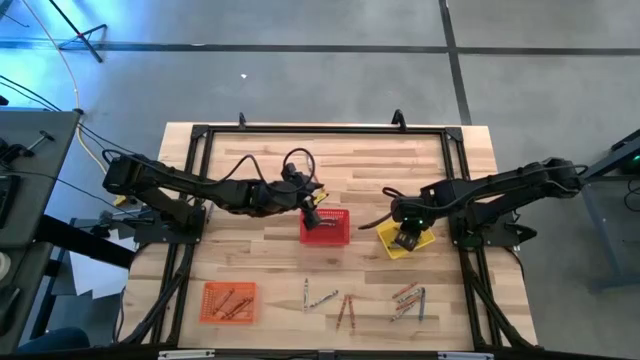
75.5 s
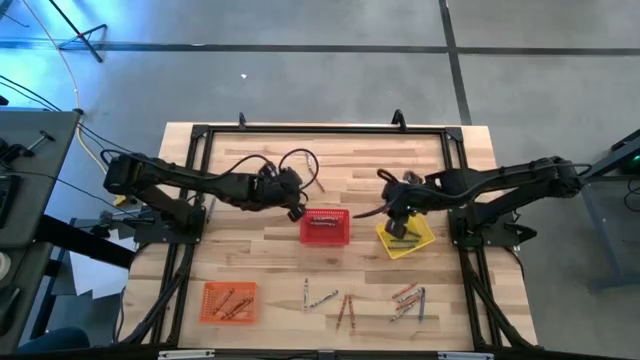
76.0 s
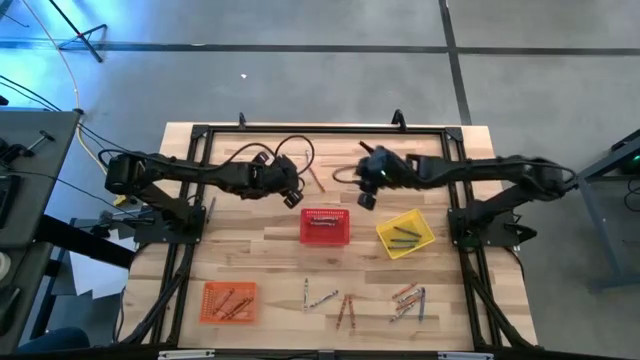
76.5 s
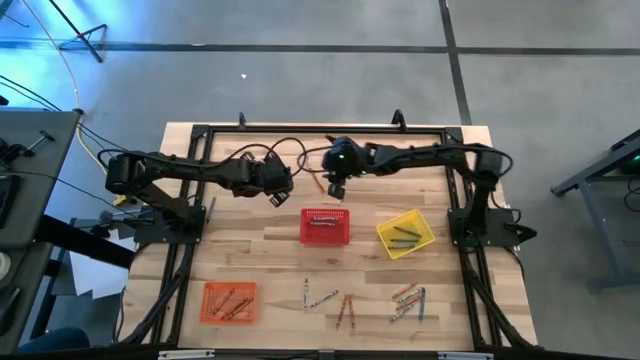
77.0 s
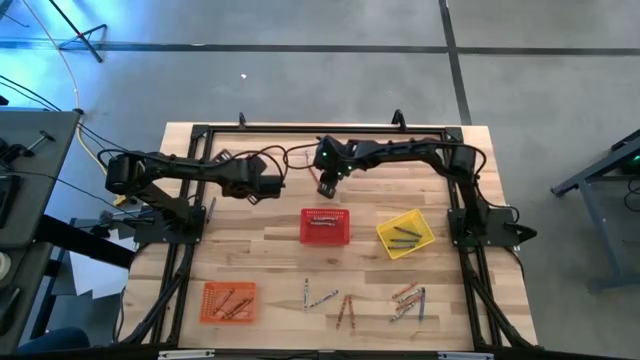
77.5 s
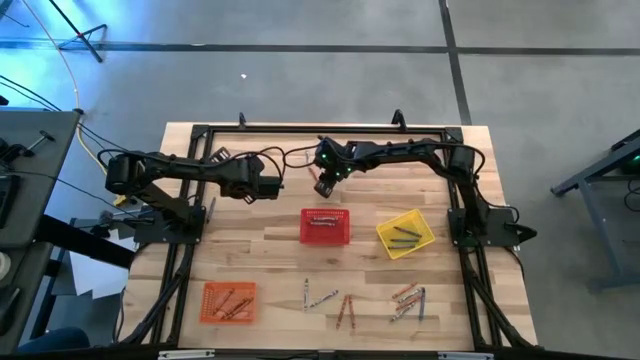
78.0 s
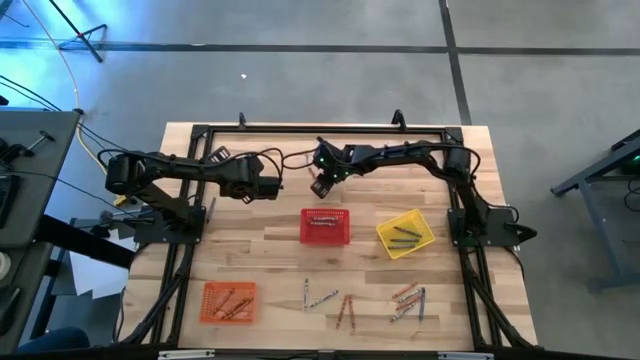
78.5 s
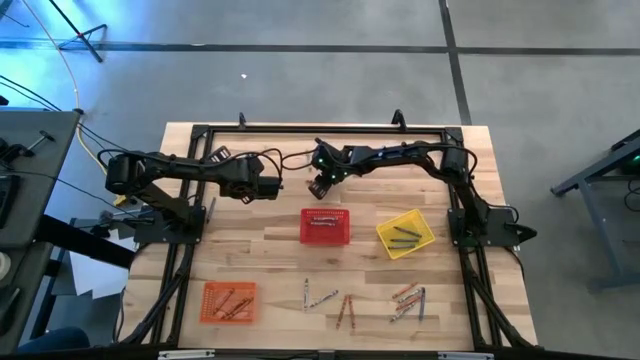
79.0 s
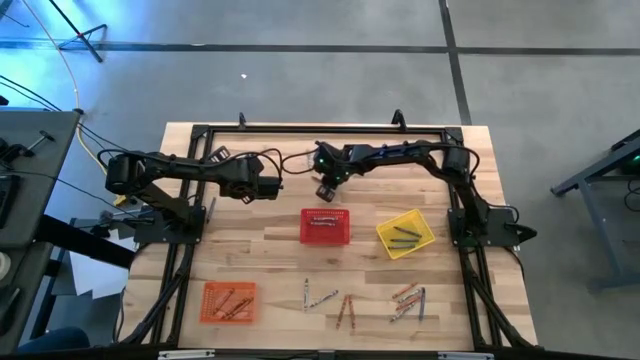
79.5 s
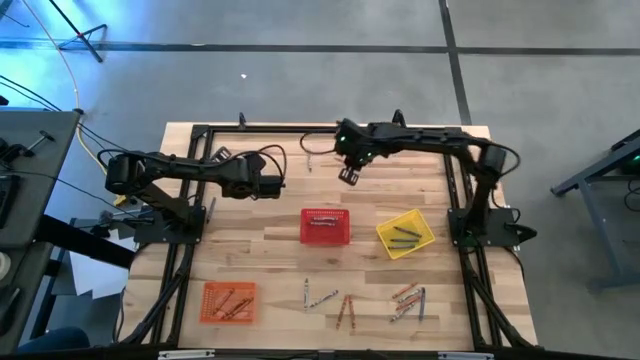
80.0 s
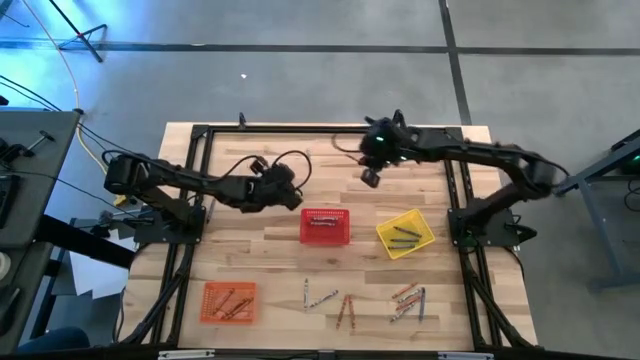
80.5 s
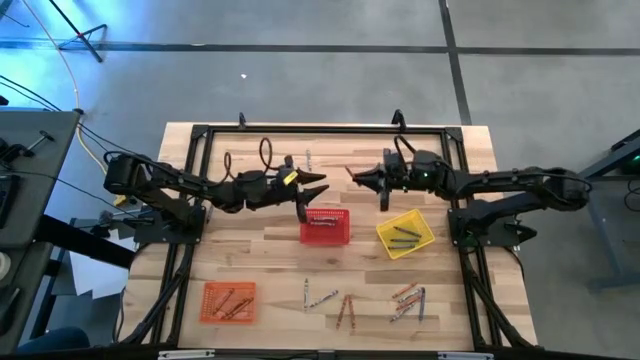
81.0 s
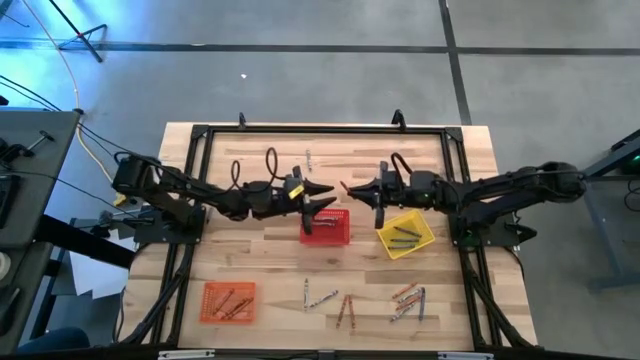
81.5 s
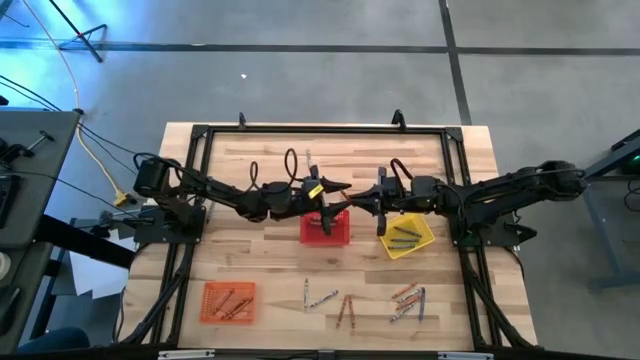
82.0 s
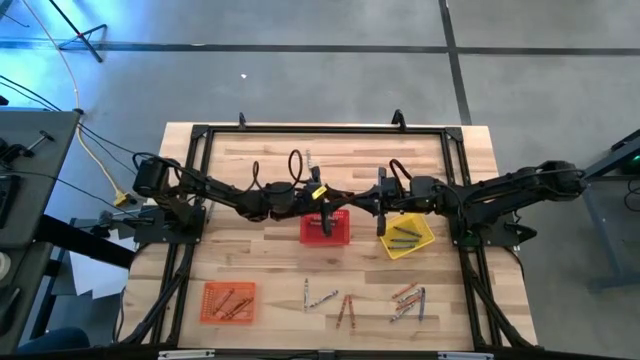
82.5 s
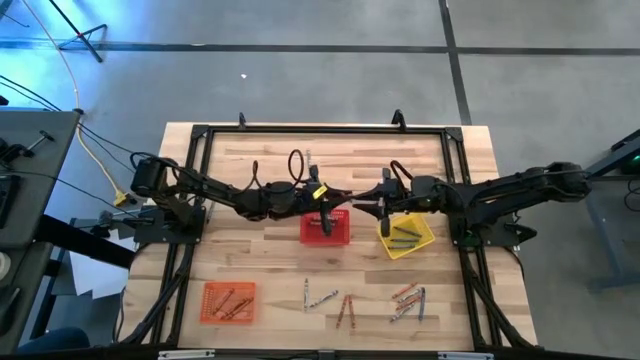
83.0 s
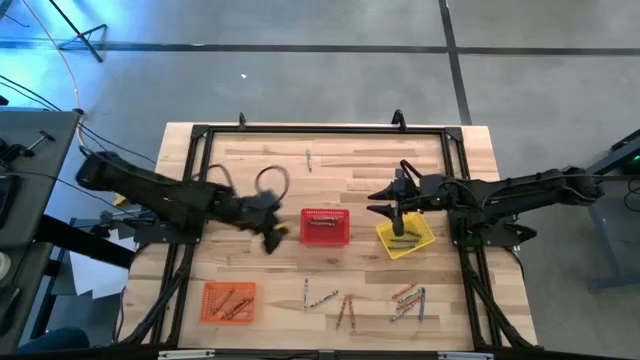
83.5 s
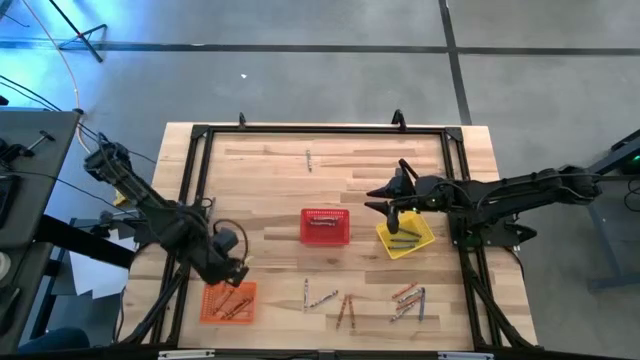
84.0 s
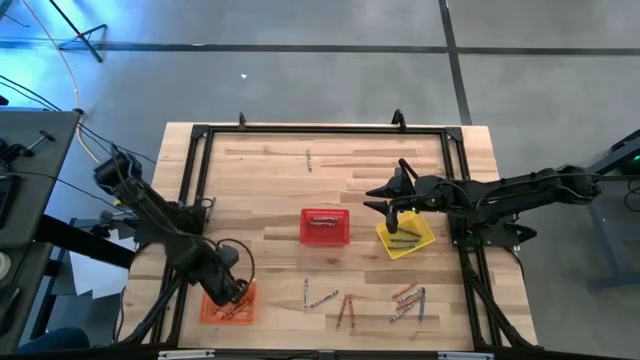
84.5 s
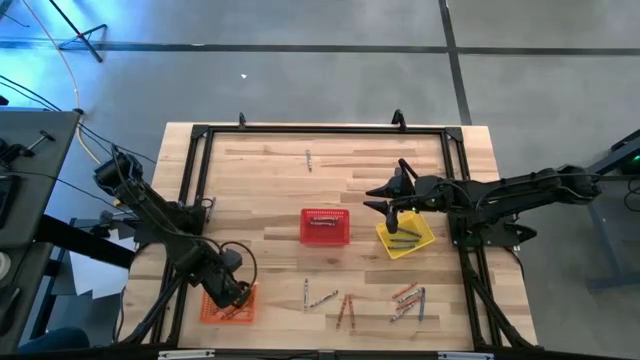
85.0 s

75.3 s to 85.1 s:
Task: Sort crayons
Put the orange crayon into the orange bin

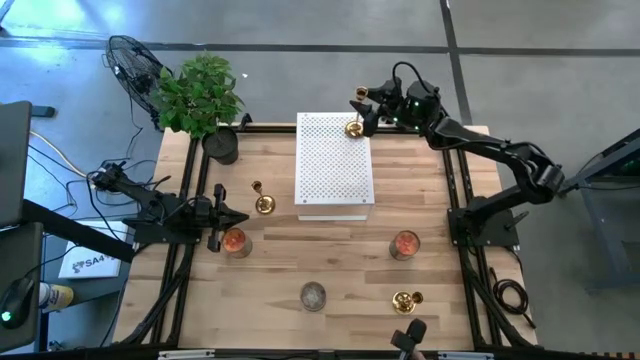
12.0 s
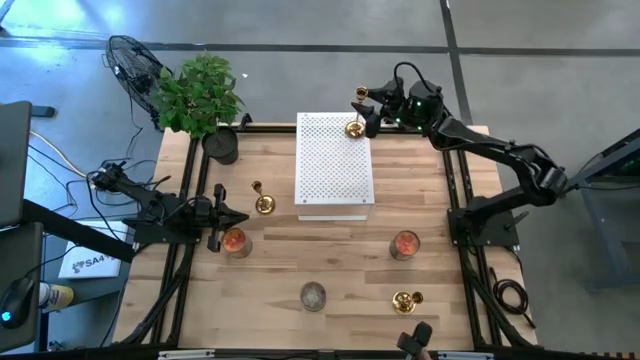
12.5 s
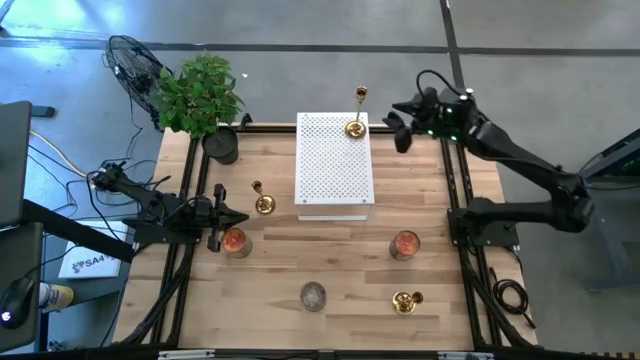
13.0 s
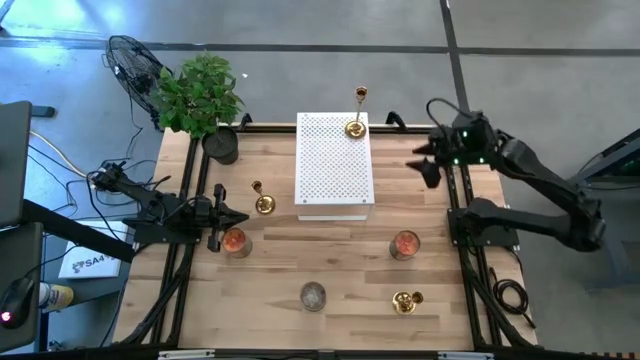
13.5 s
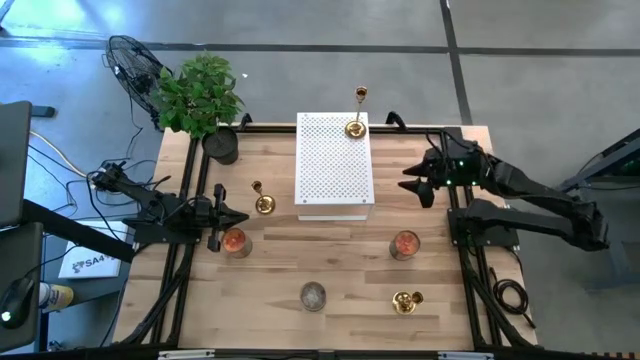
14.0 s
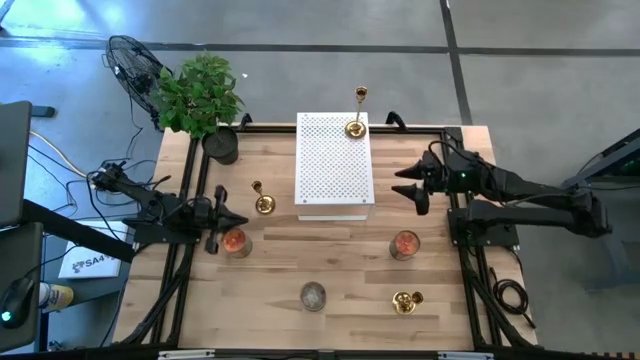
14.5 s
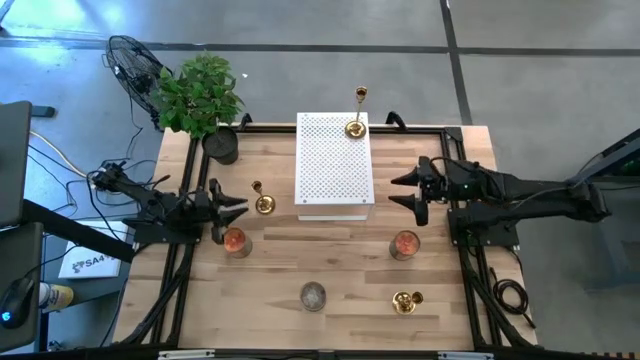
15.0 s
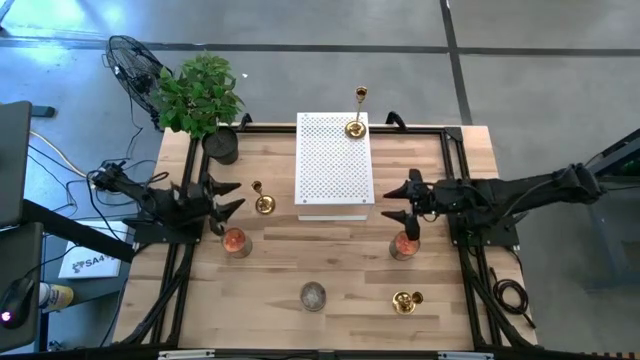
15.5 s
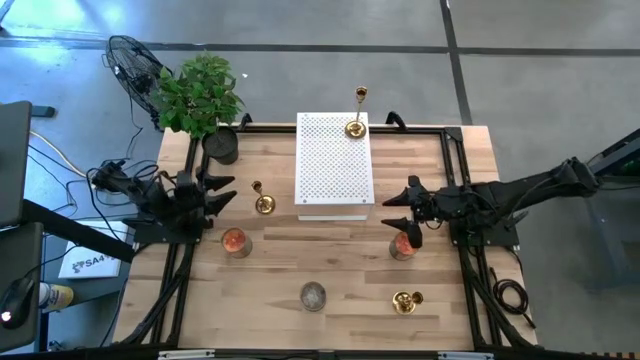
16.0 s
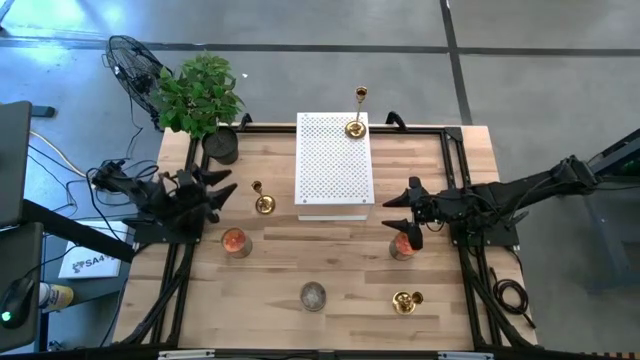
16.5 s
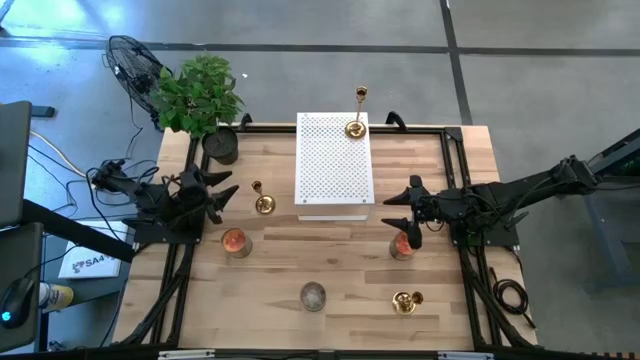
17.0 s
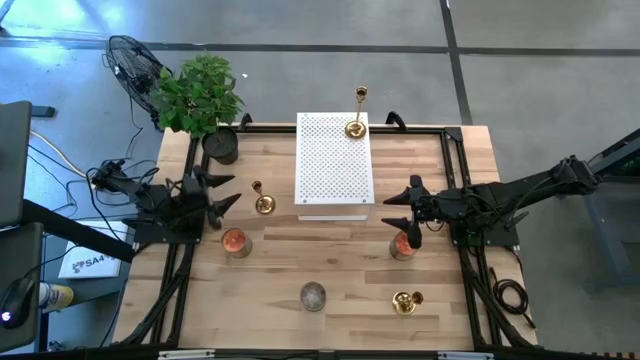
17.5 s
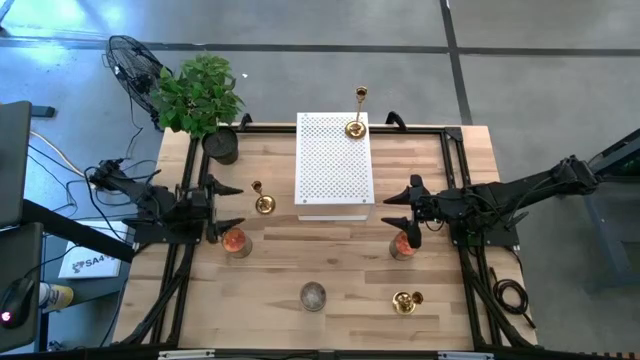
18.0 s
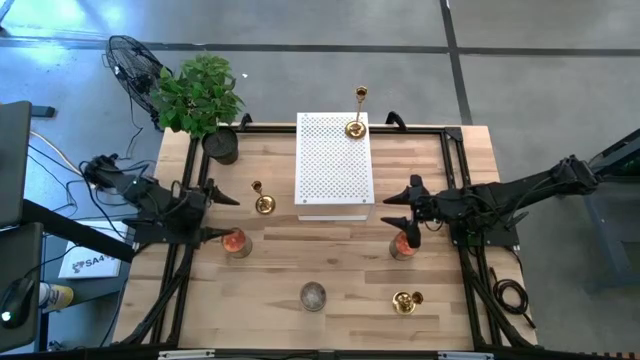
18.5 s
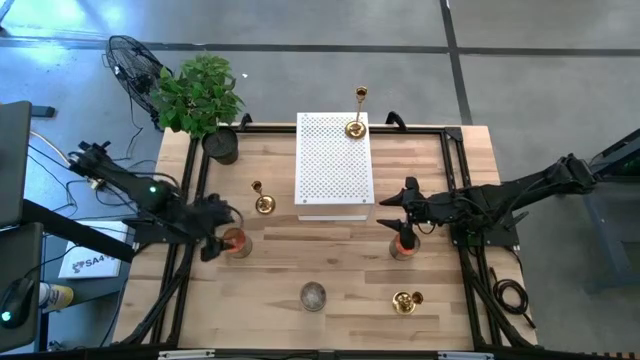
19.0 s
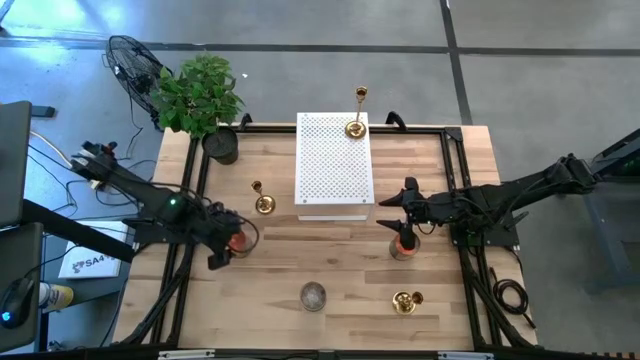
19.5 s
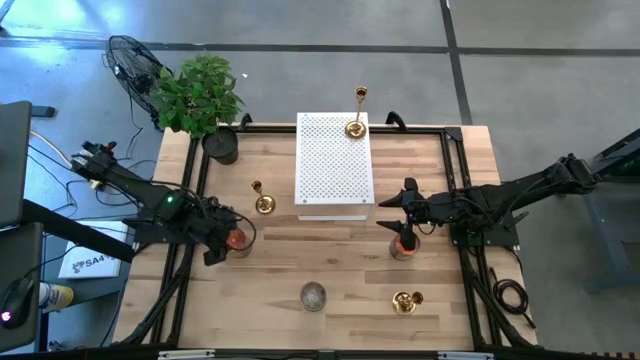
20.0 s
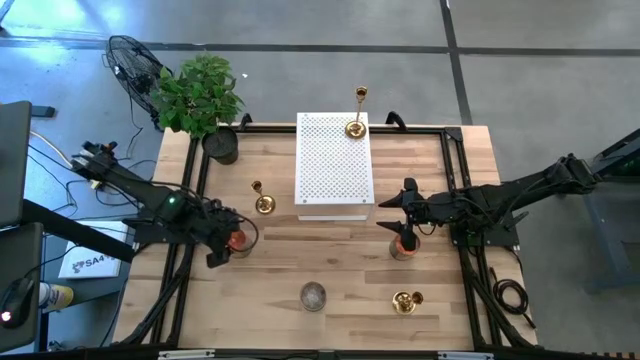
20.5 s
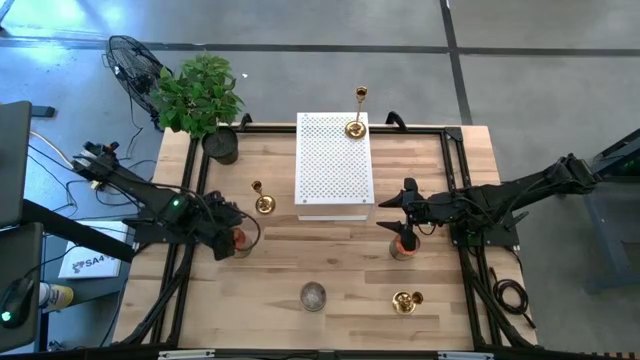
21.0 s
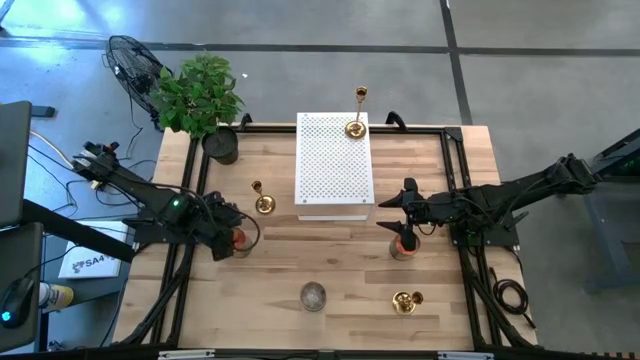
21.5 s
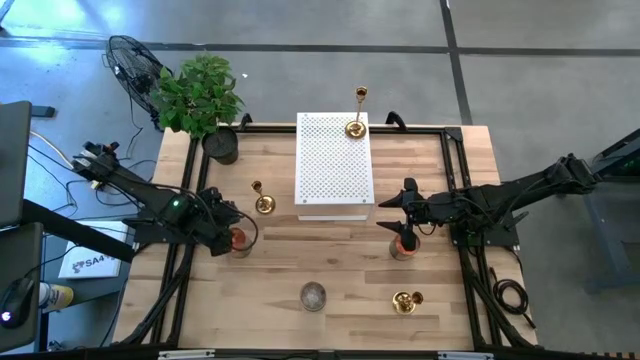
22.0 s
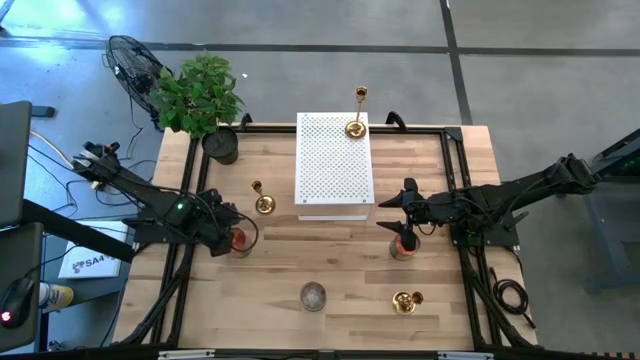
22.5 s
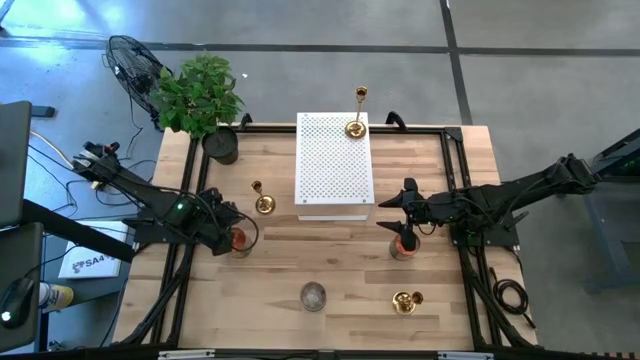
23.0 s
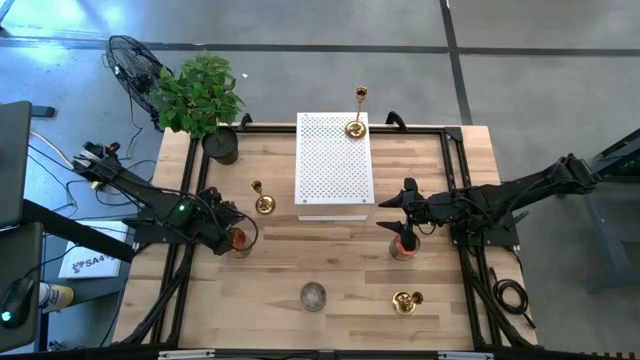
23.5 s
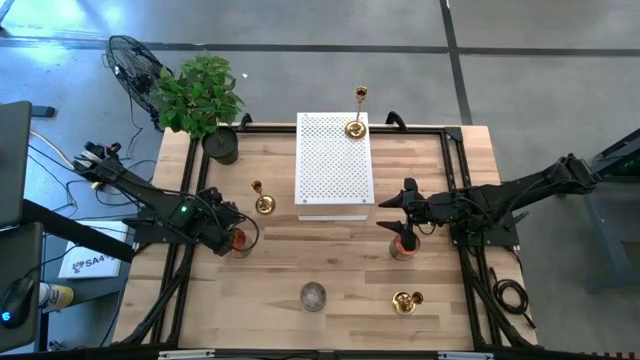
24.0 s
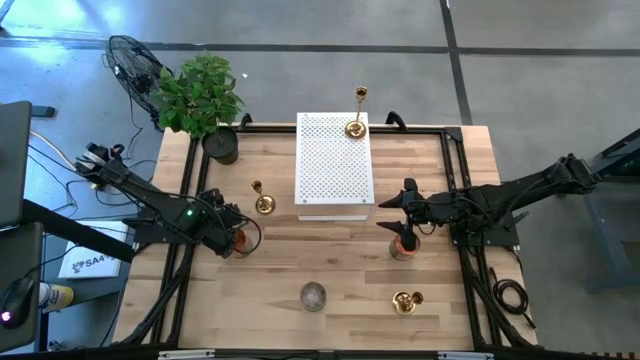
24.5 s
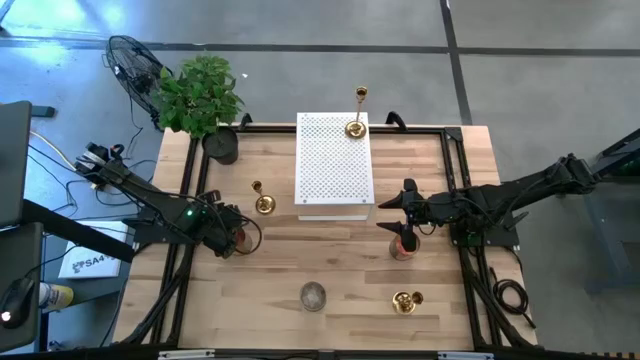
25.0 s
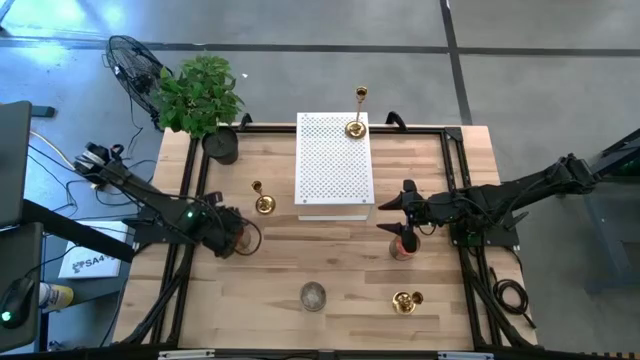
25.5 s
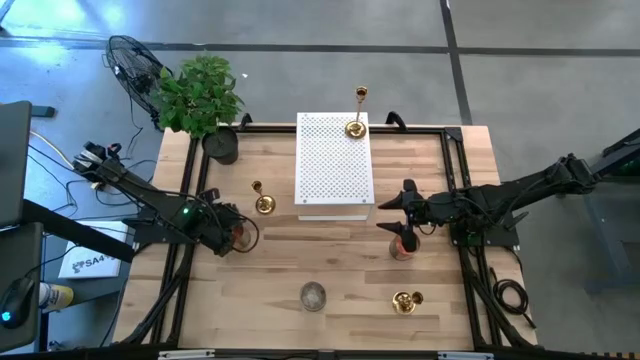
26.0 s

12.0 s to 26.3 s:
Task: Pick & Place candle stick holders
Put the left orange scented candle on the shelf
